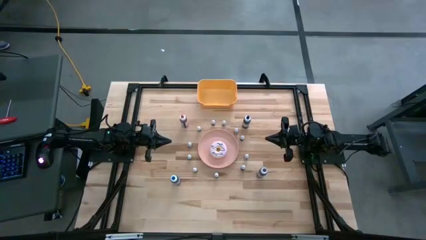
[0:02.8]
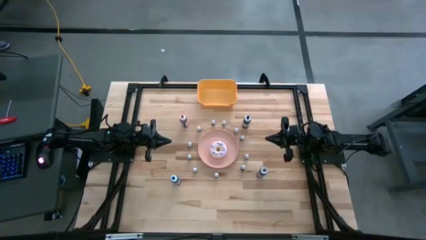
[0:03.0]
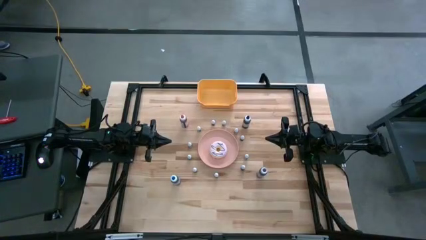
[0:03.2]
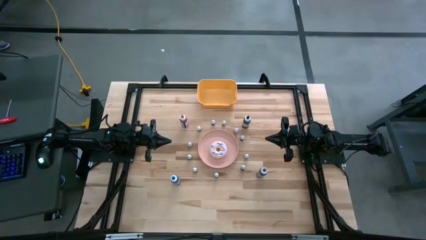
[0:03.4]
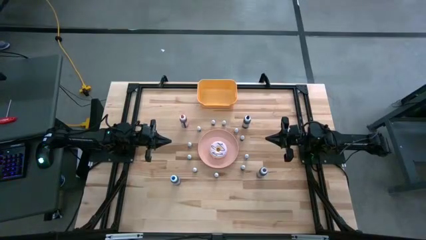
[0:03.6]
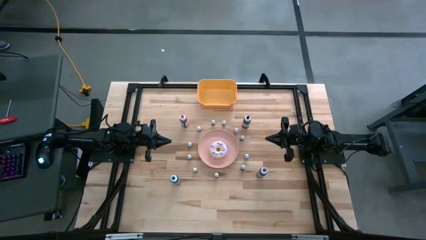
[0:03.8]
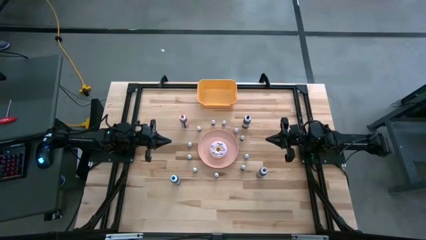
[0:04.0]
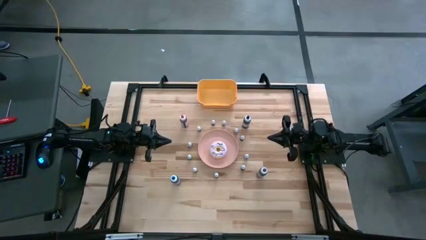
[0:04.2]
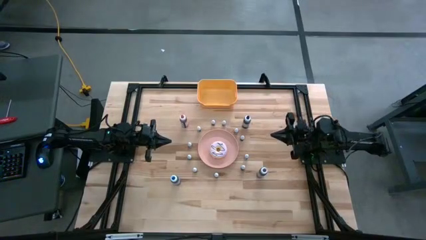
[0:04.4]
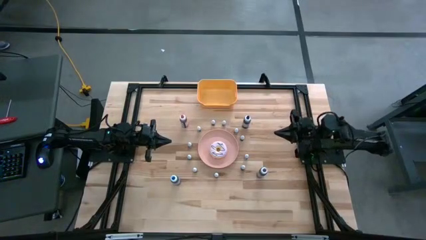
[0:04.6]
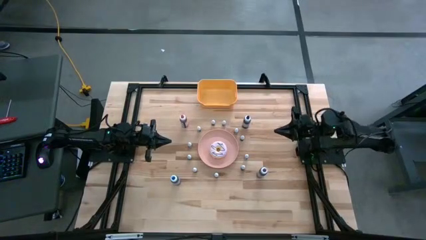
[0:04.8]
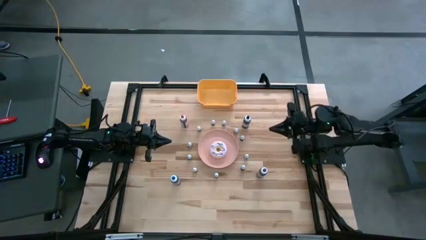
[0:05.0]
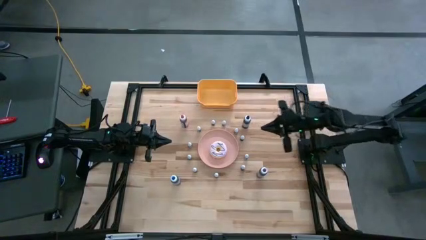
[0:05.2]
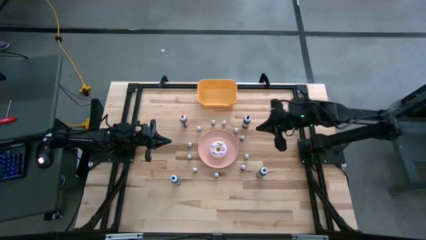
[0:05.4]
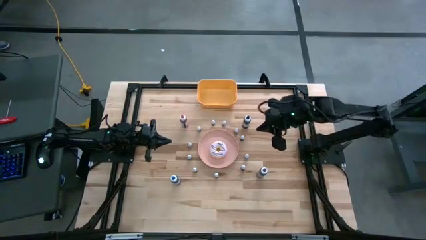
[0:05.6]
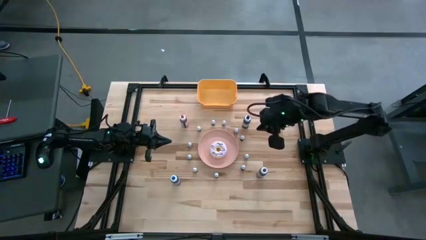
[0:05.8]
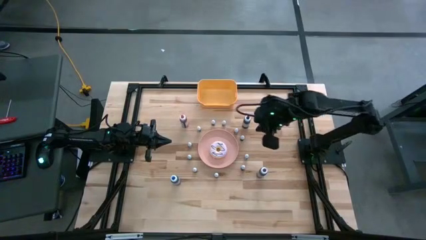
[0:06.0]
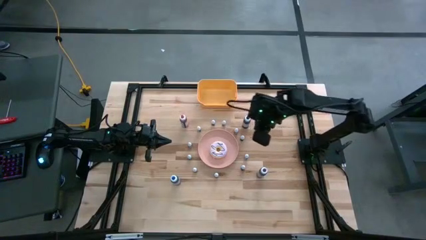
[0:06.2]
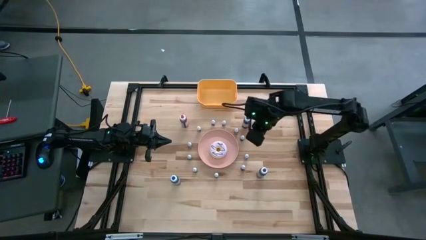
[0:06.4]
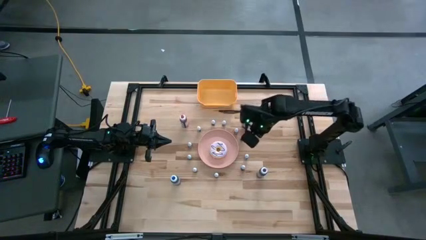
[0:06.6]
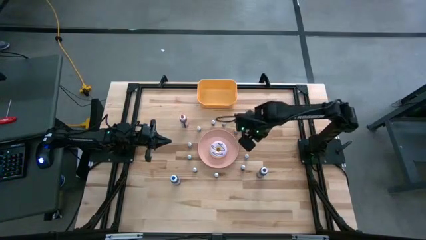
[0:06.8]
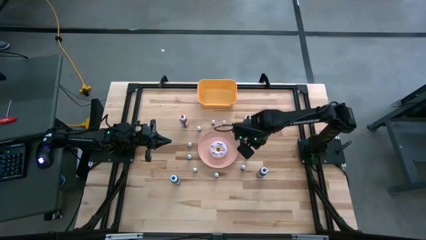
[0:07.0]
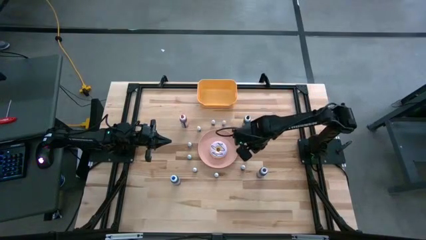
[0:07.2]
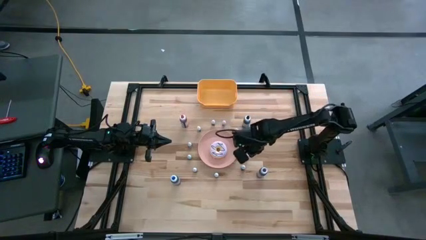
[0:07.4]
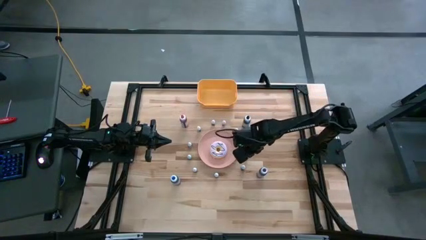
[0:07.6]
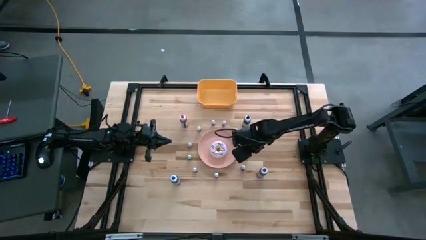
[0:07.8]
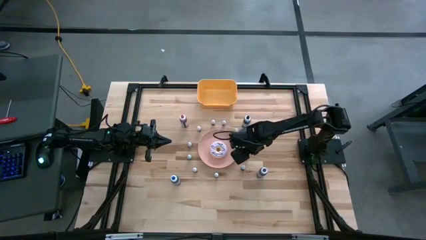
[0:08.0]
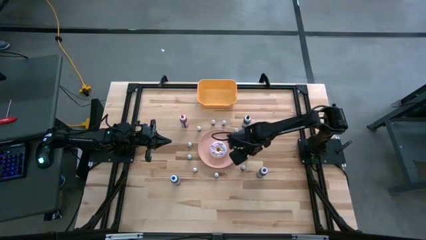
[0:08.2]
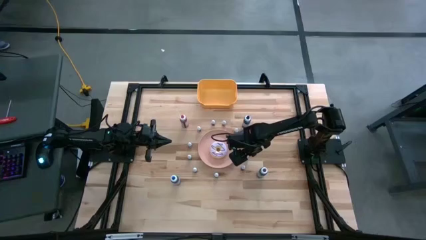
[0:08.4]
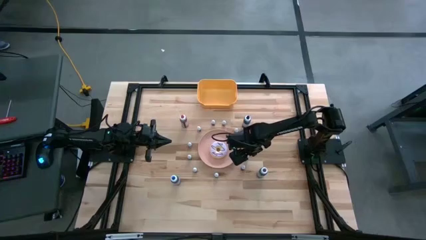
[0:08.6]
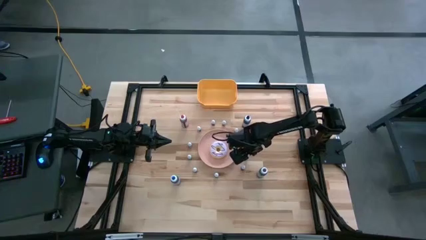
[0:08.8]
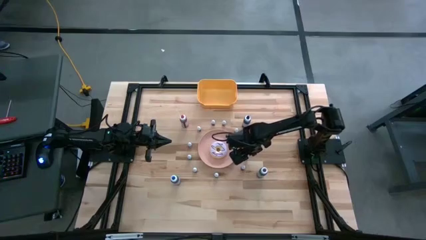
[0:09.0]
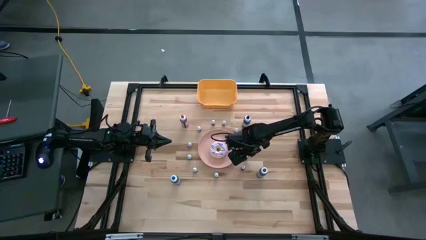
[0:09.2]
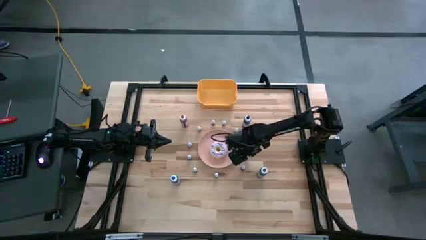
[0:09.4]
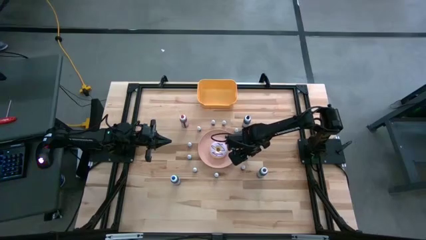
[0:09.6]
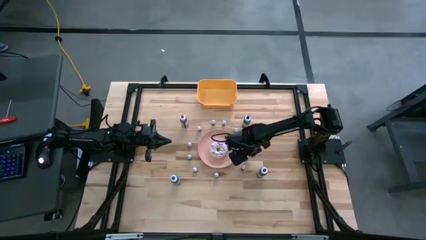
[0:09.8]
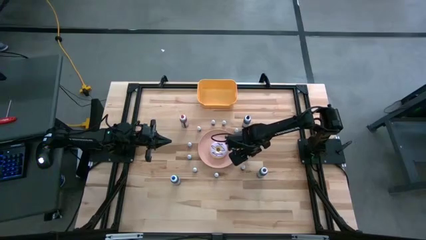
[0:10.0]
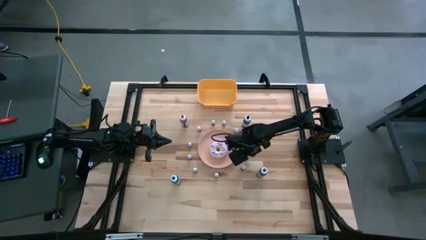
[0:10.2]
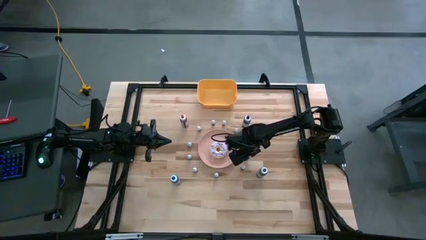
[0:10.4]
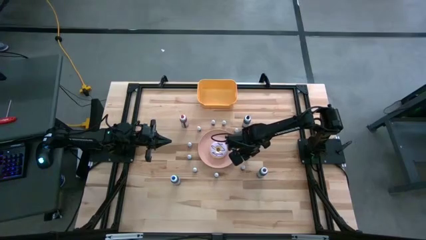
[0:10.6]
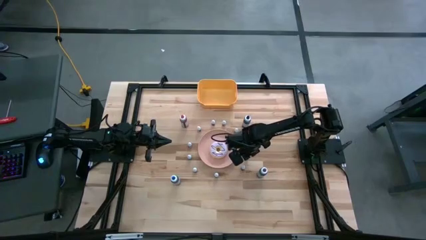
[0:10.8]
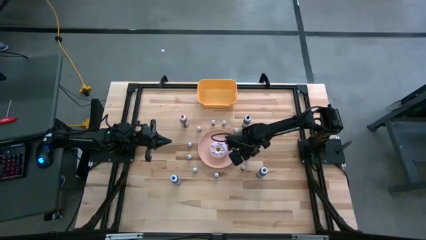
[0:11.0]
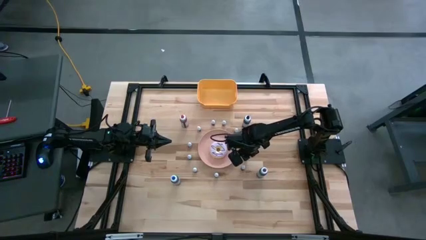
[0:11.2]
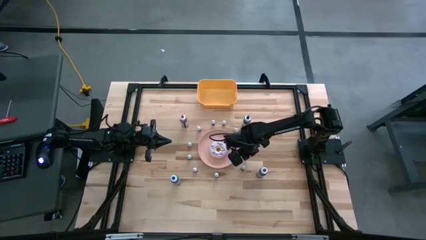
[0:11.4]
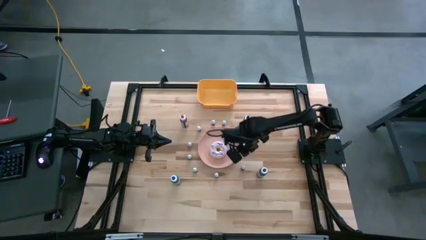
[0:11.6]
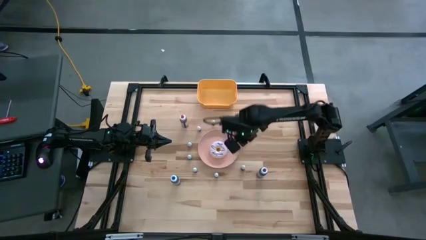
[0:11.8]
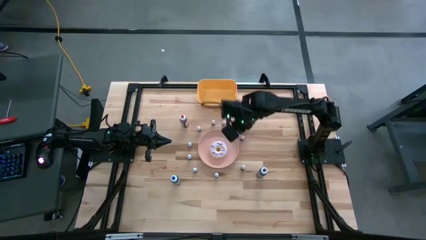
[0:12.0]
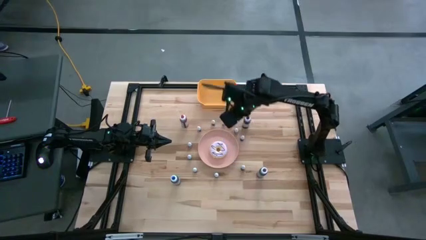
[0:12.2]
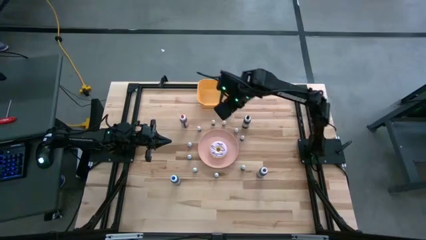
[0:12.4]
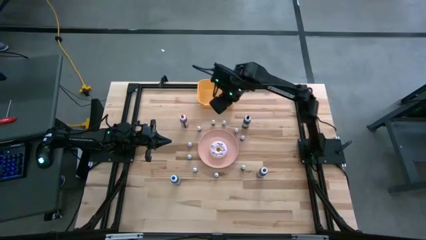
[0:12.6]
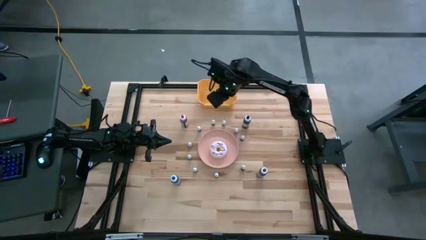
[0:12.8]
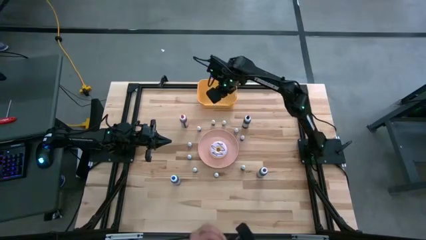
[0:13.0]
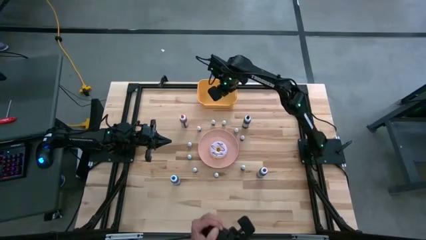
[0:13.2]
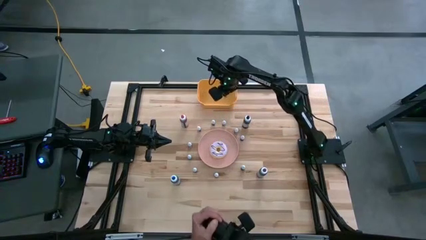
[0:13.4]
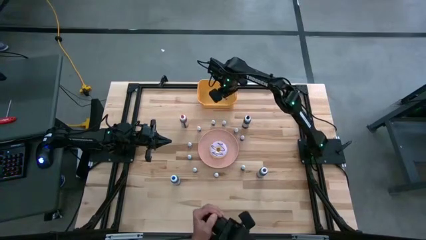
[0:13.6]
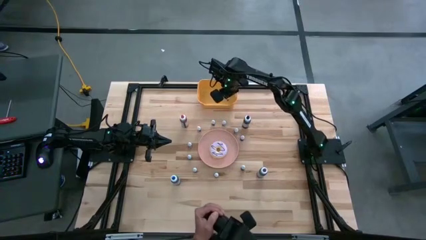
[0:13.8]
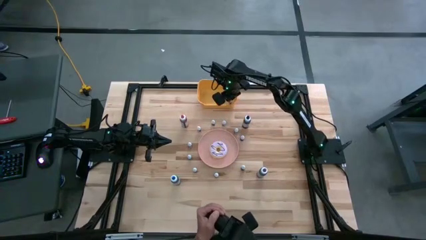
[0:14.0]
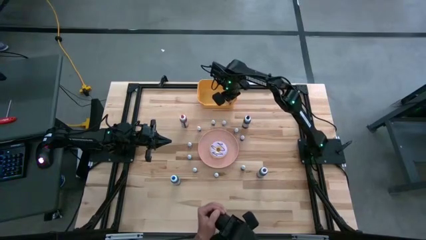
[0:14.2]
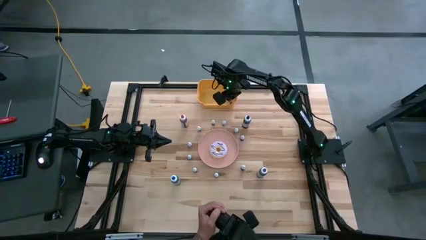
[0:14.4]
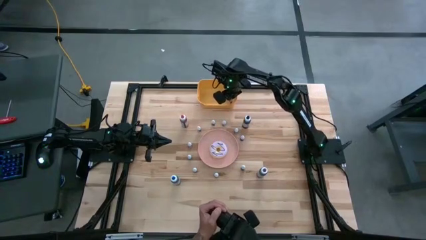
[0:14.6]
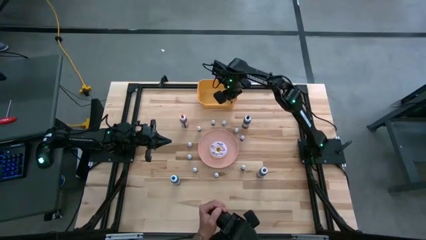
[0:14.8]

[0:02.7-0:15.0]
Task: Pick & Place food coloring
Put the small green food coloring bottle into the orange bin

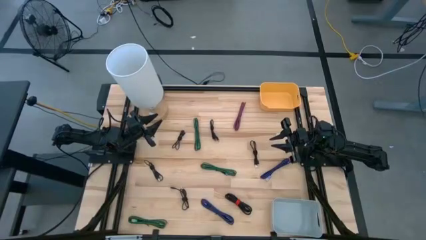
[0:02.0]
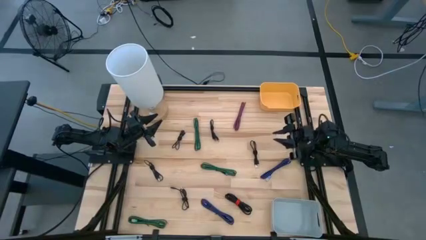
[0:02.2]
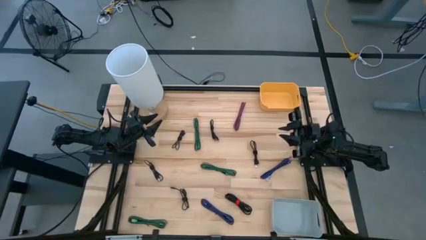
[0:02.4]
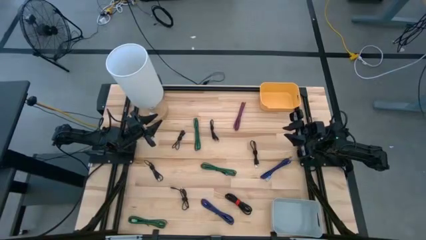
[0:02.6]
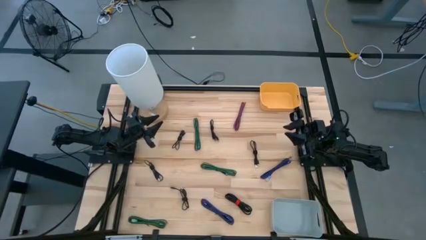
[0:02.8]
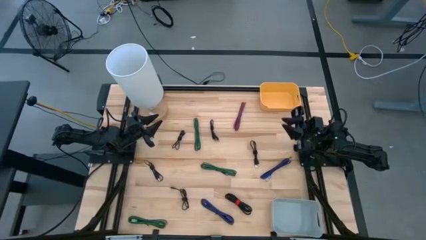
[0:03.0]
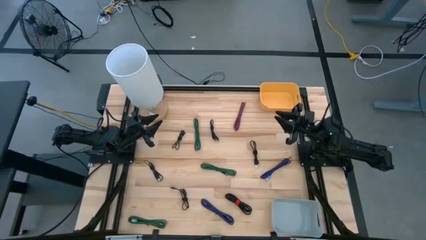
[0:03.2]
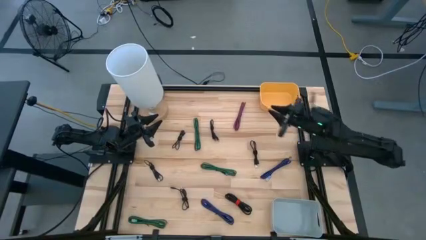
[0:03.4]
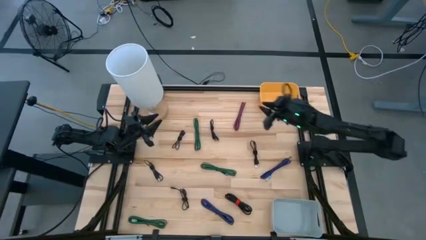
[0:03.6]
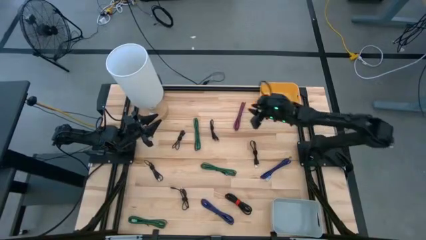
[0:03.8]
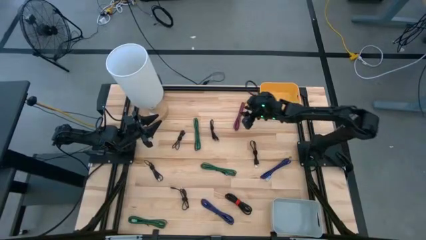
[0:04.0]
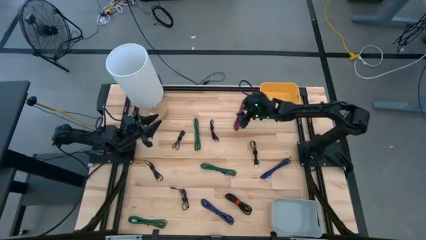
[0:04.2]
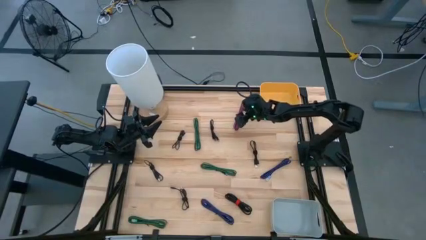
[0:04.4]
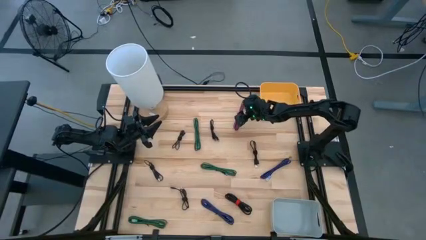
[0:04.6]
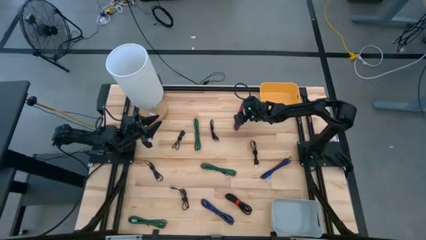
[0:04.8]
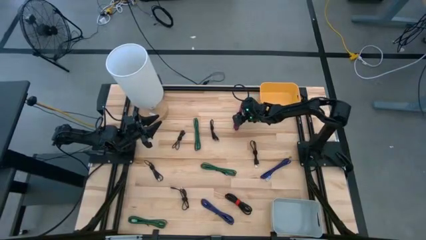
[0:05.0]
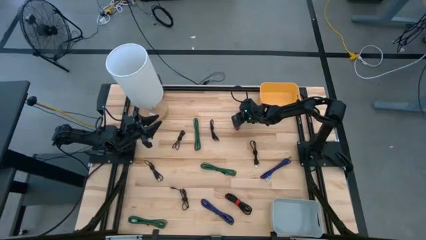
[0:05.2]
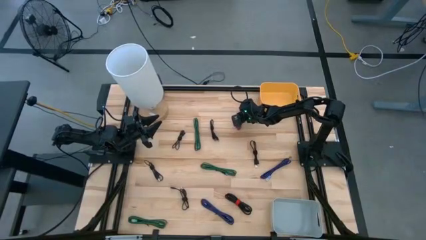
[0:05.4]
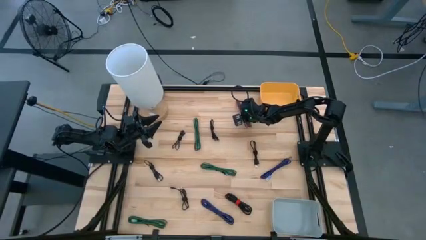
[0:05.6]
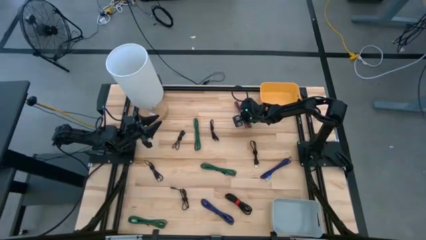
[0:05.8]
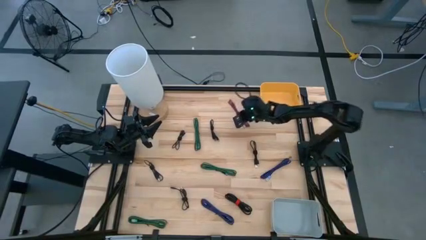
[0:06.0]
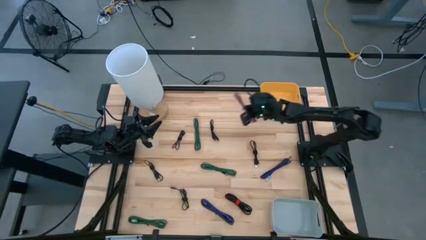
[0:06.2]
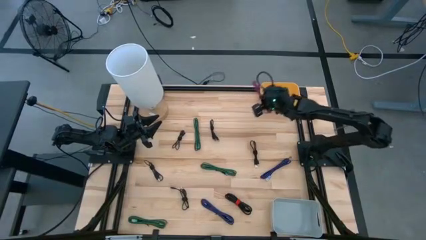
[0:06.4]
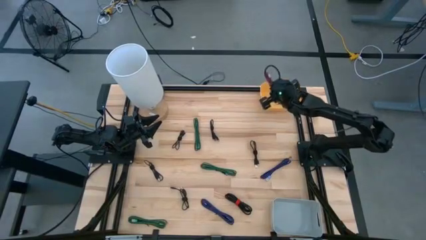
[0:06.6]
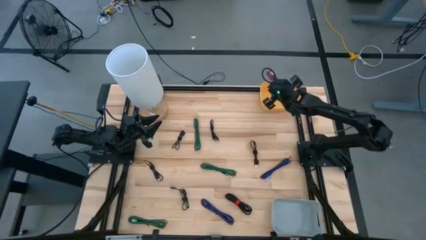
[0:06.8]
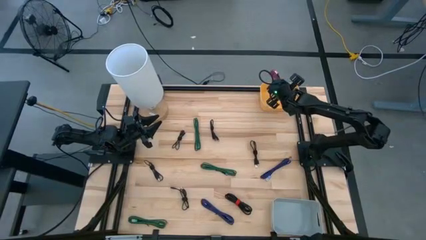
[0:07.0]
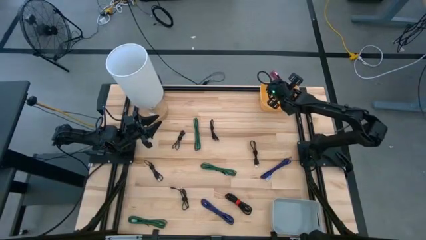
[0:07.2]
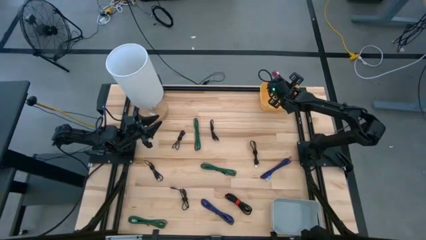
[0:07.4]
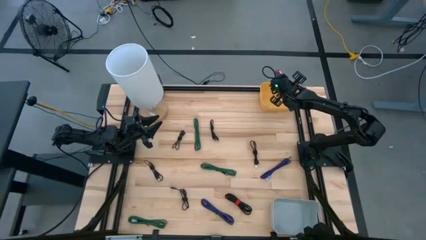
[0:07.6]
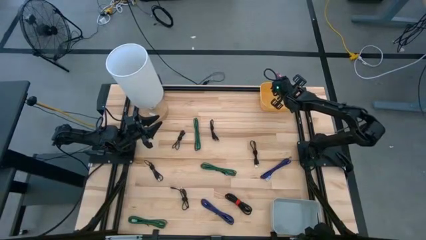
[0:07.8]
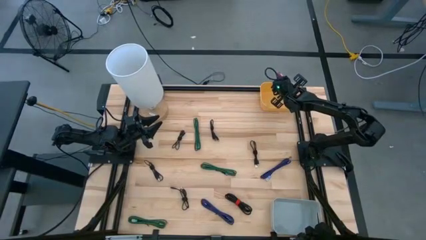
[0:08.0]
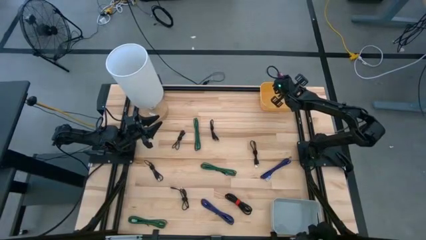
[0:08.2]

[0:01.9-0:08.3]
Task: Pick & Place USB Port
Put the black and pink USB cable into the yellow bin
